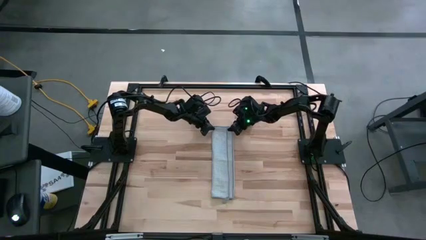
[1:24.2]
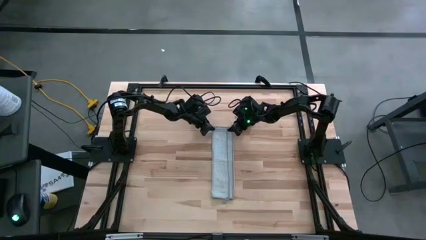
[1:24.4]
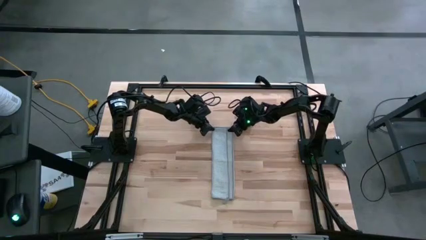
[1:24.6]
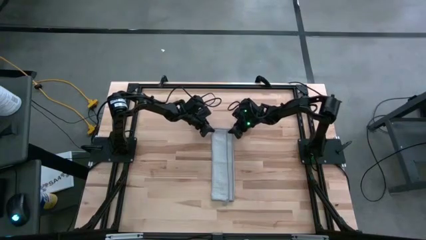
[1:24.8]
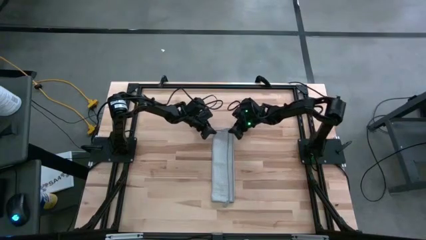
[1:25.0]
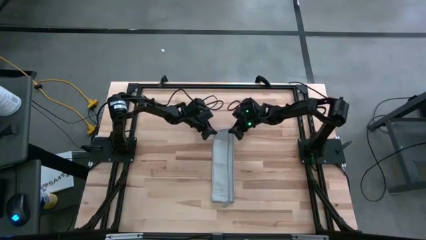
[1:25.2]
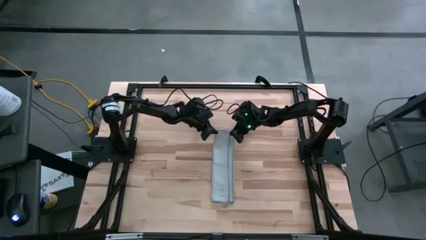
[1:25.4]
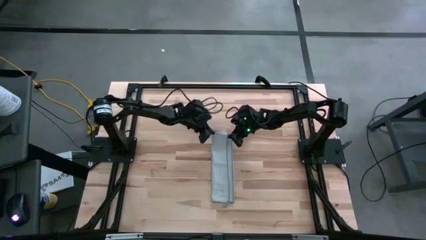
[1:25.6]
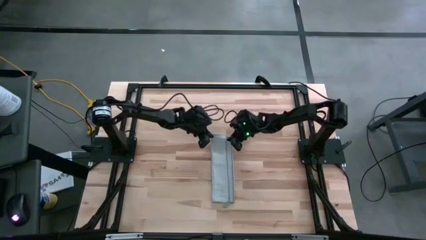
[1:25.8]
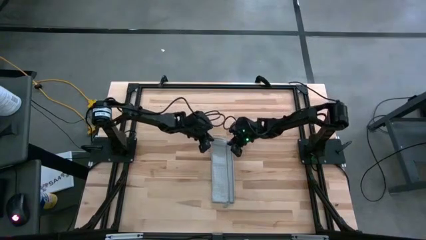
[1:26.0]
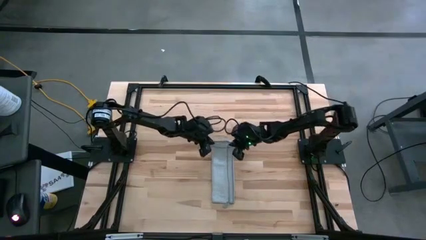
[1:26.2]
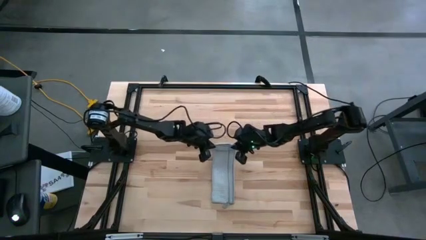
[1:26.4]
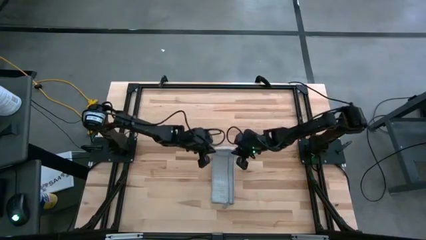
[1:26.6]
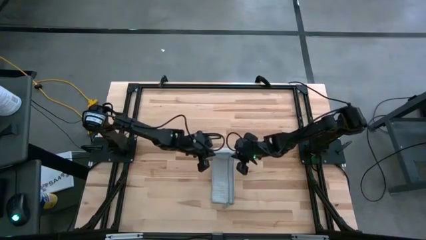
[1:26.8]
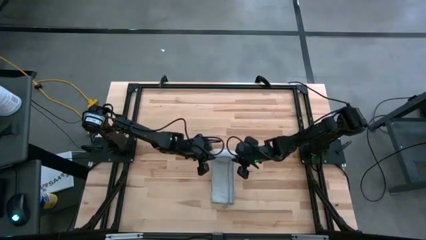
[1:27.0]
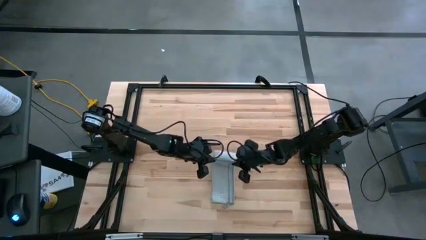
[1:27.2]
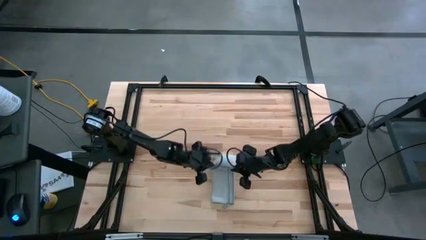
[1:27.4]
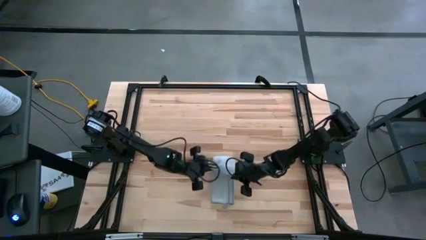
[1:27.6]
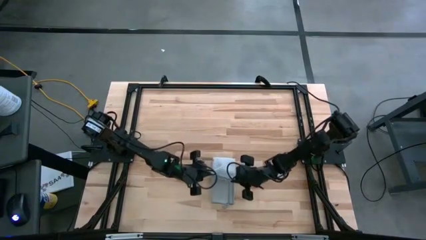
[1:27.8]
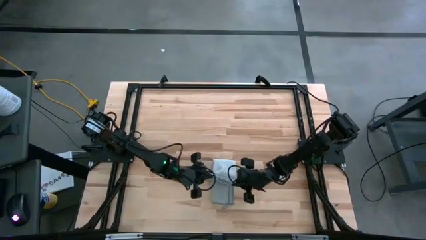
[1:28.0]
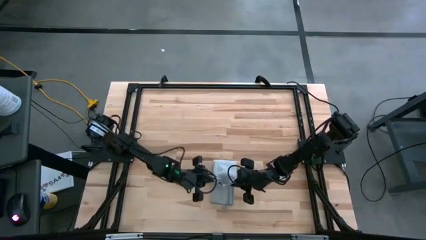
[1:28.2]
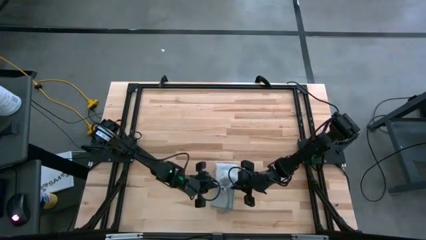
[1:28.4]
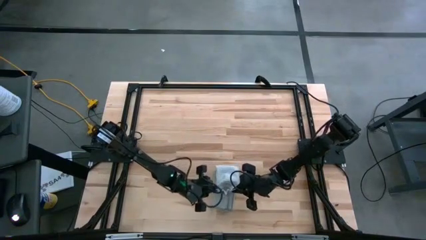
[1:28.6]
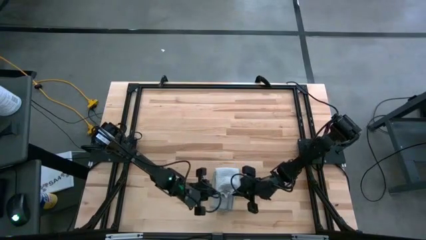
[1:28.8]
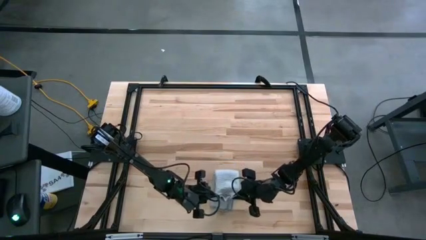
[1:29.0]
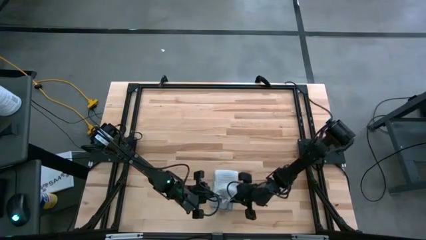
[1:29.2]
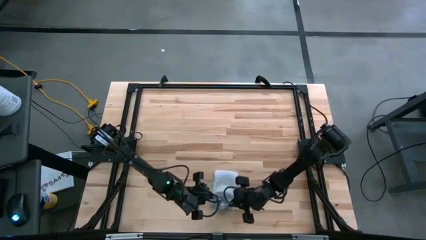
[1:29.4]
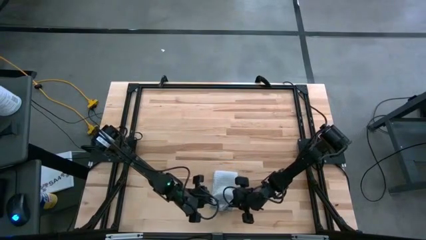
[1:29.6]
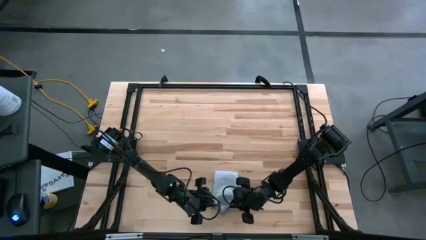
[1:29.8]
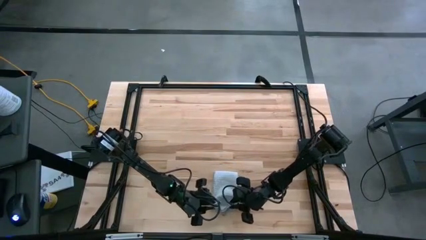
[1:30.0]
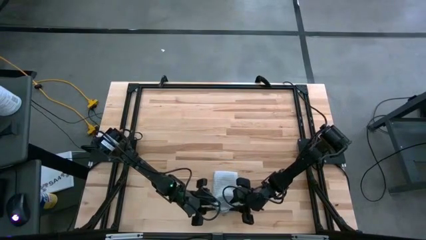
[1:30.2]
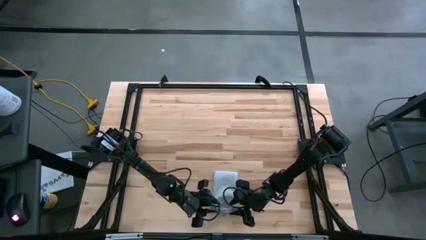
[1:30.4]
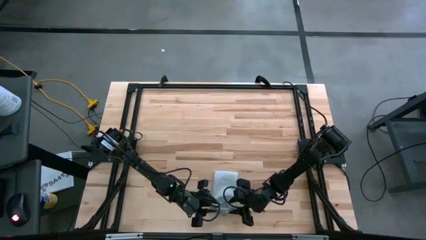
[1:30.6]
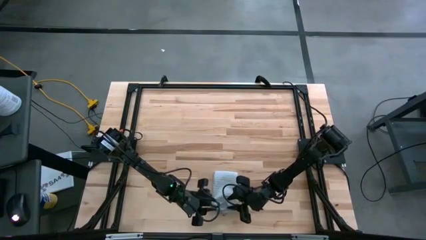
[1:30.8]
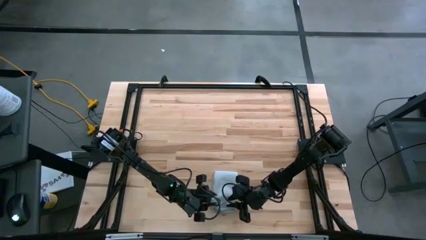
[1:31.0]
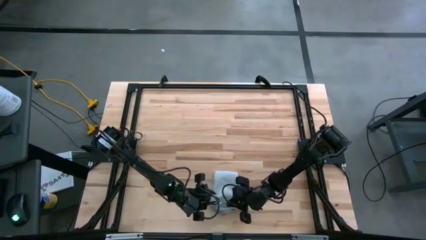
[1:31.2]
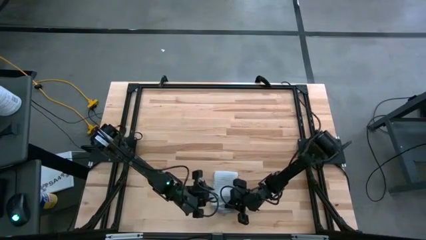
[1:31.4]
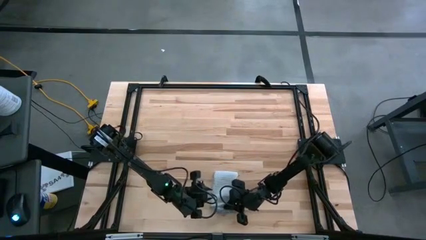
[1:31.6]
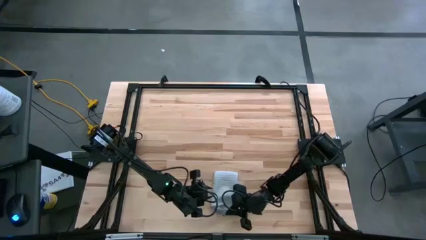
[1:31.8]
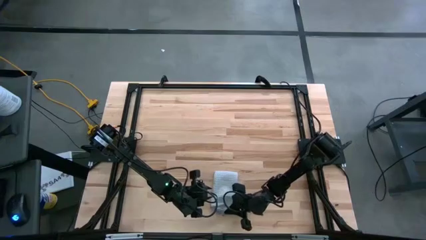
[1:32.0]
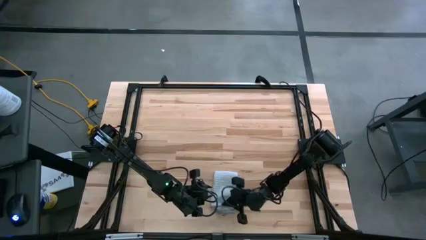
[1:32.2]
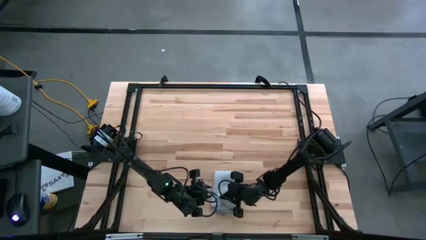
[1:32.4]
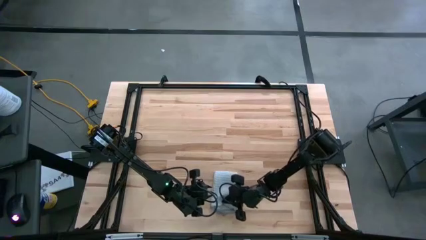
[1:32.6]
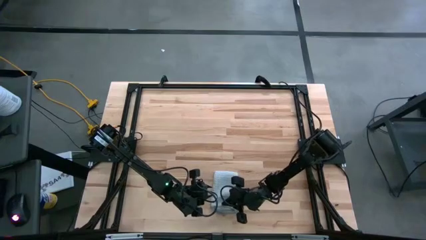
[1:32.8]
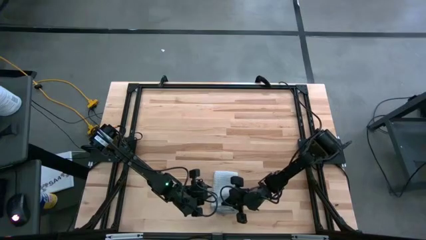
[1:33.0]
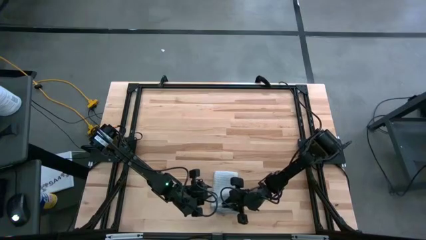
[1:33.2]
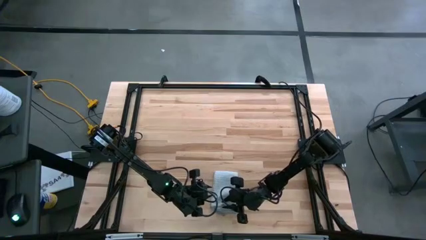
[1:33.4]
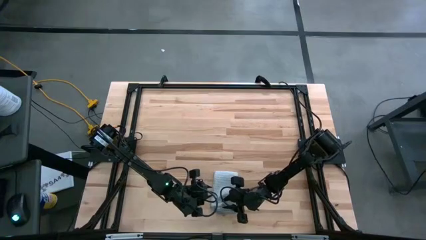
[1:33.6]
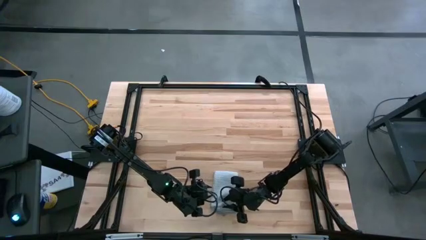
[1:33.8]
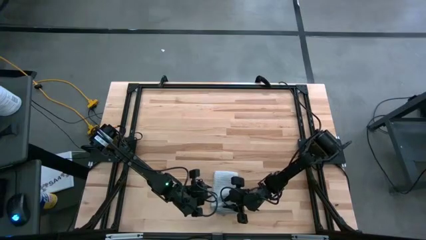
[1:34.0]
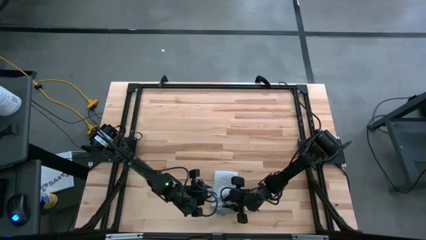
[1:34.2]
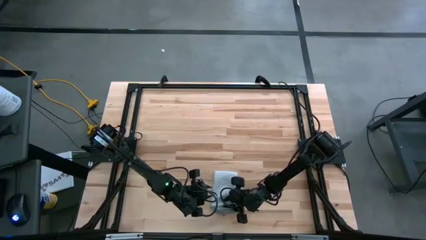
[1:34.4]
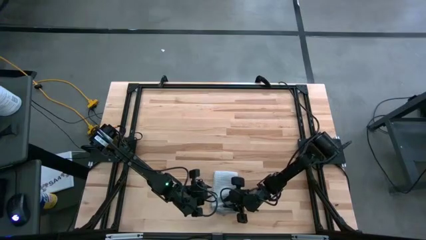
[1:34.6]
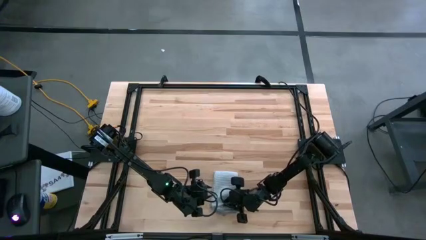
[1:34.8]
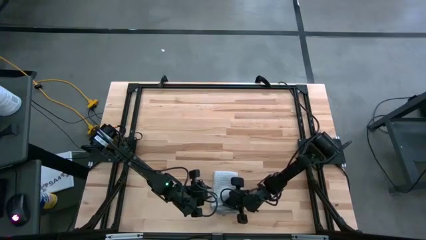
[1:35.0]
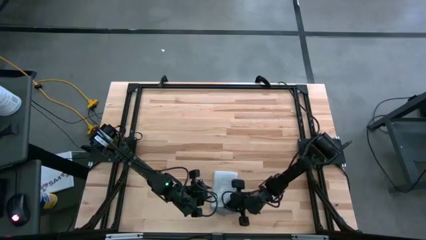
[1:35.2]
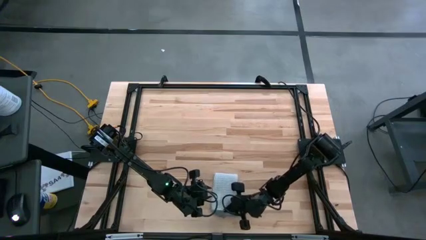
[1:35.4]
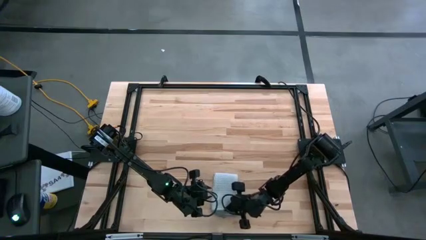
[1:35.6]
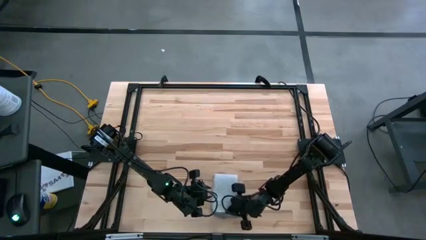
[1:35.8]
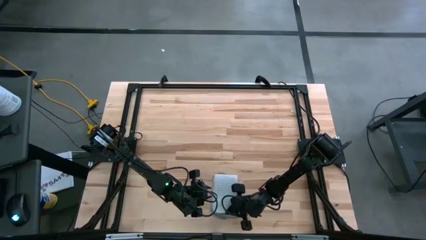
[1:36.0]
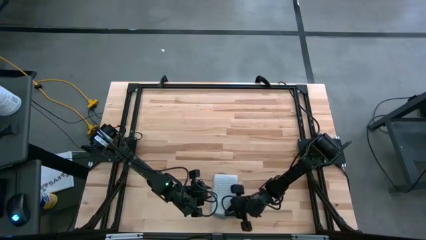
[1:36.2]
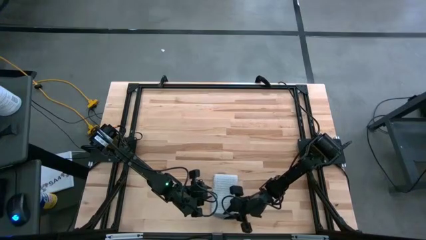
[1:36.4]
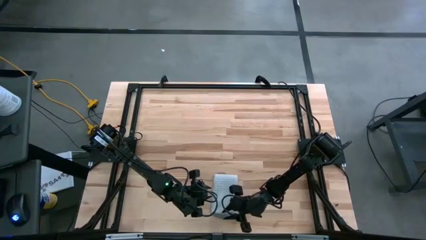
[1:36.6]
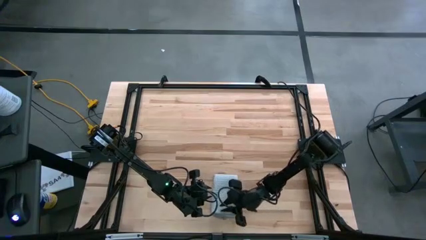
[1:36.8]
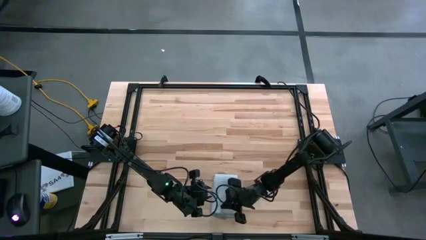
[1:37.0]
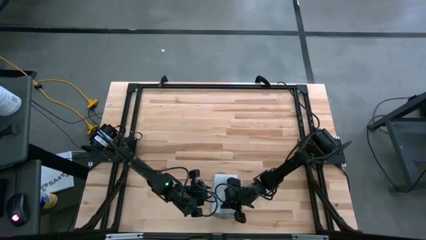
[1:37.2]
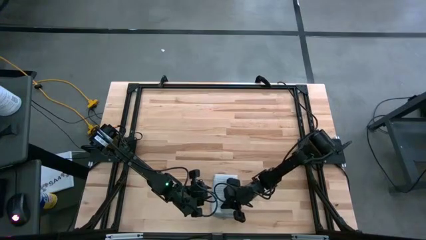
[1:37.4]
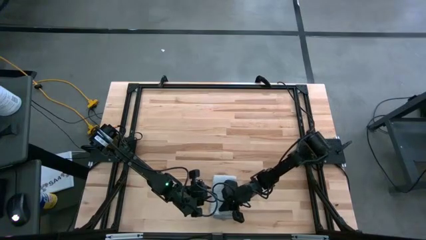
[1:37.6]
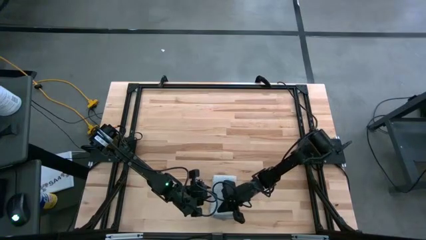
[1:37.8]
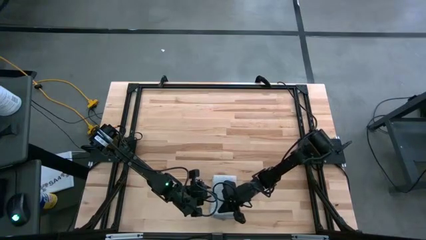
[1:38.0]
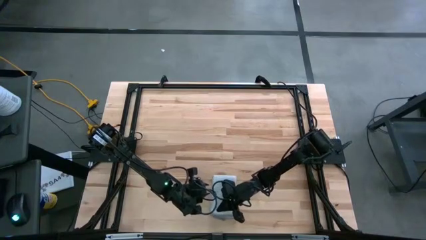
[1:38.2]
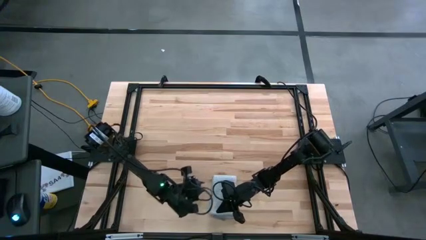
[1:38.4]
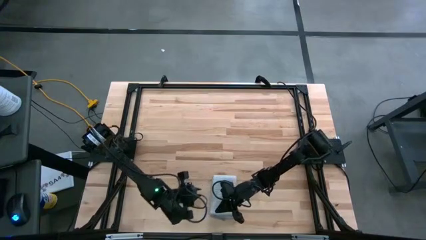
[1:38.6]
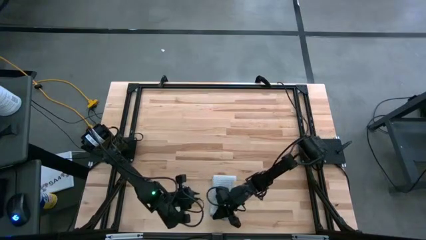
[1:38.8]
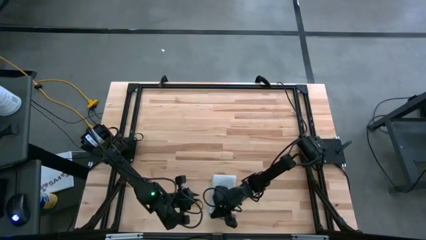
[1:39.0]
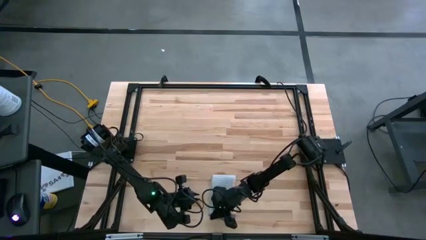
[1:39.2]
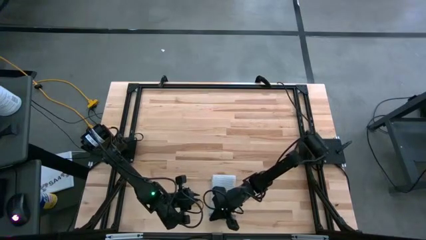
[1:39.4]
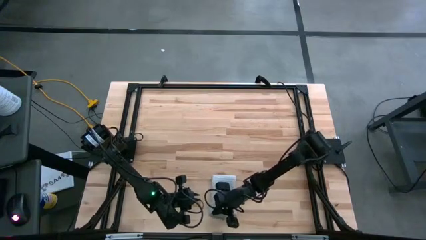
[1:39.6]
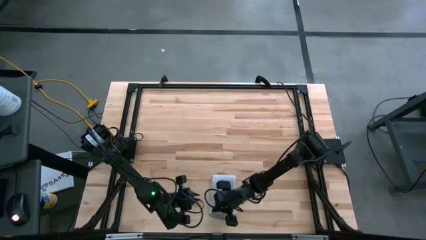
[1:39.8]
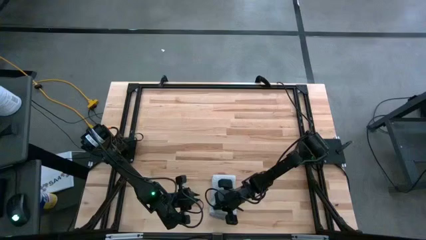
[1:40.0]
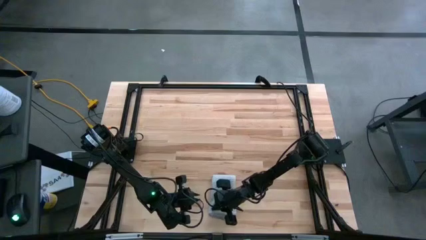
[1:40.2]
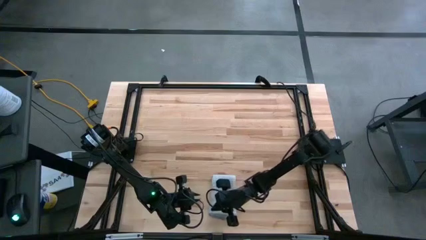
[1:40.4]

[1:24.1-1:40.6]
Task: Fold microfiber towels
Fold the gray towel
